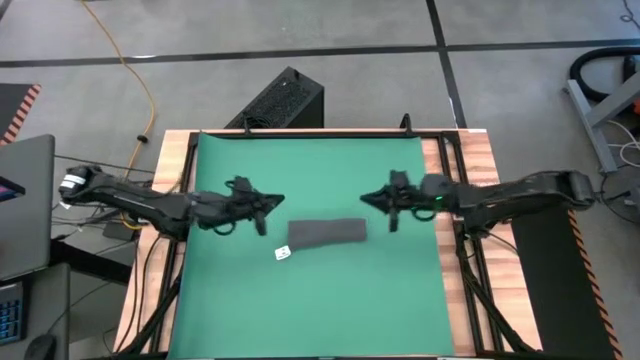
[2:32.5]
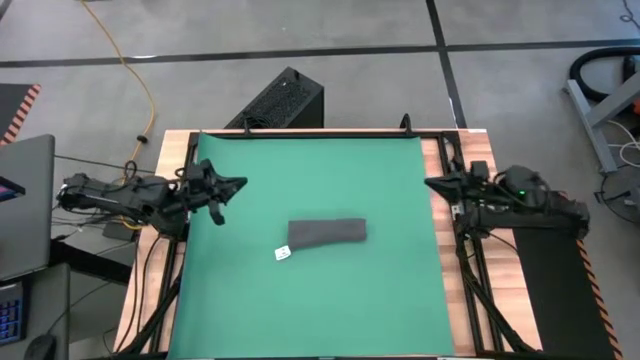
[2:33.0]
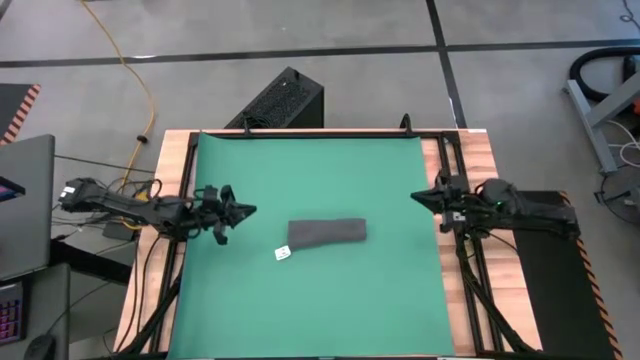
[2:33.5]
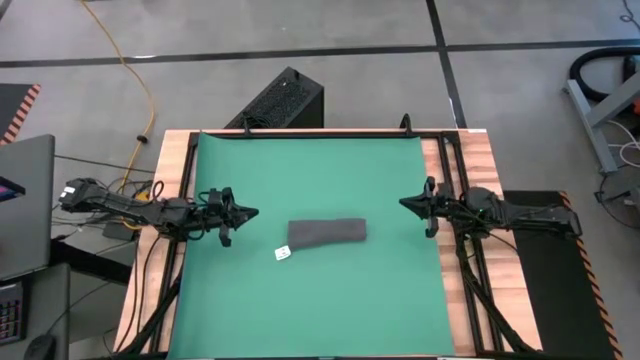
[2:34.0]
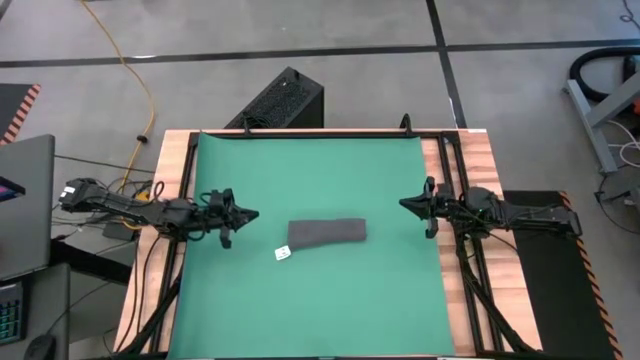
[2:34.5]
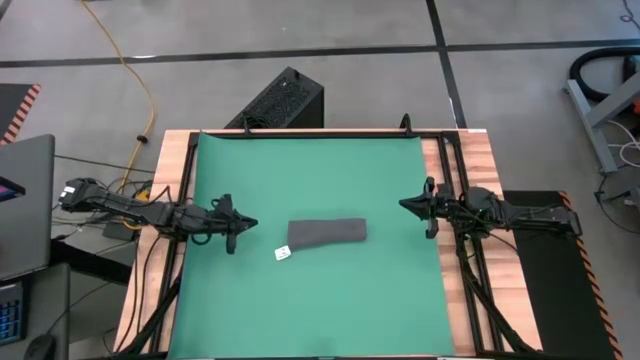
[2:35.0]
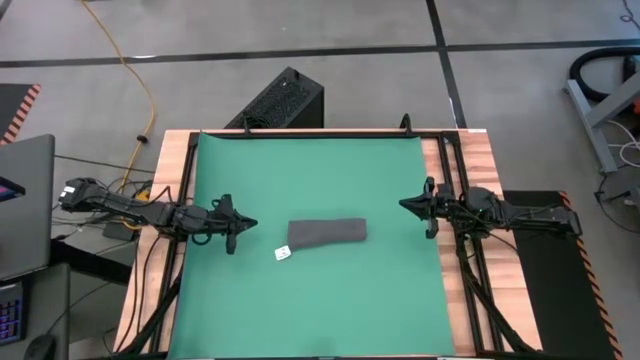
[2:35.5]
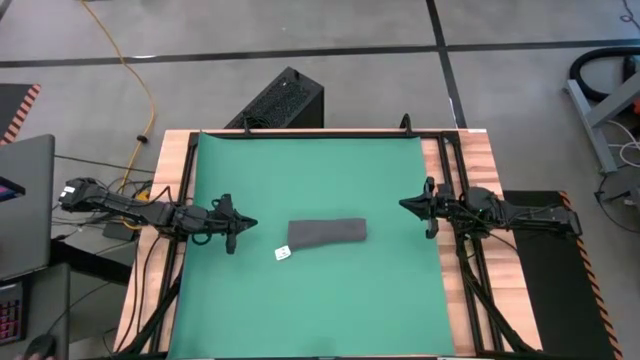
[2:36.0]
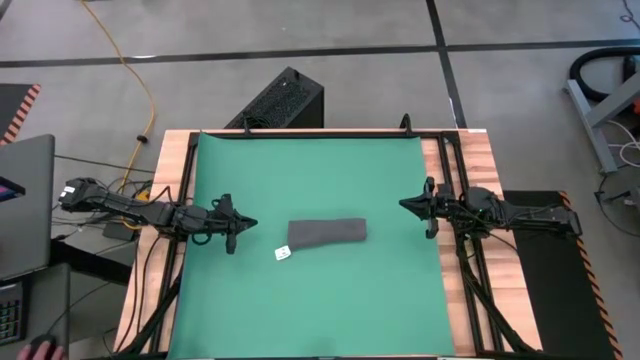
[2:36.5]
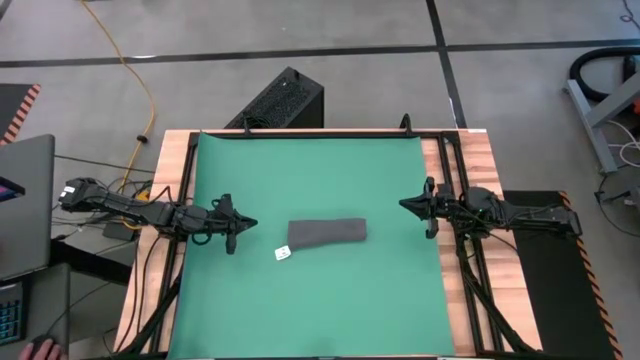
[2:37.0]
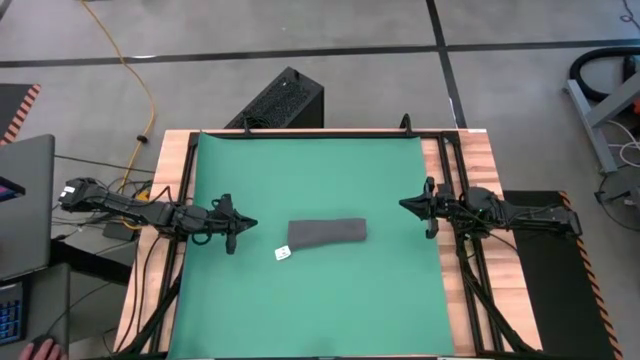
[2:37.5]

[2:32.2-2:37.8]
Task: Roll towel into tight, uniform cylinder
Return to Home Position

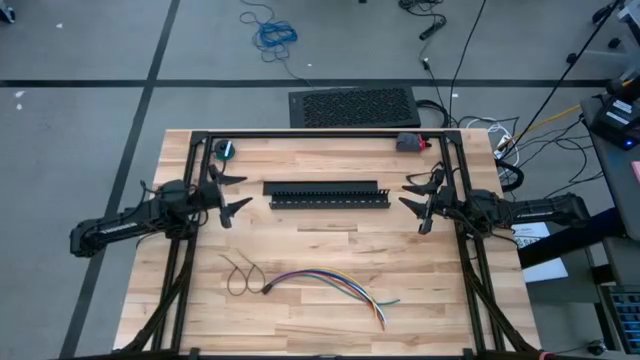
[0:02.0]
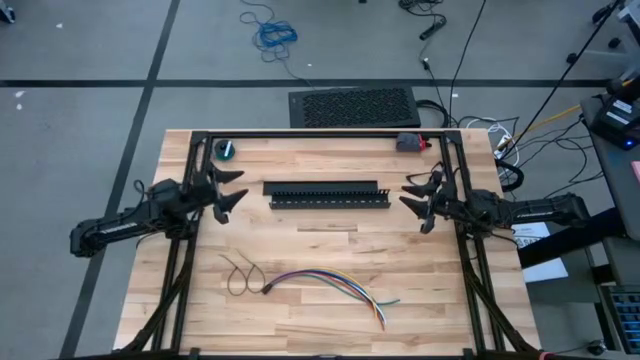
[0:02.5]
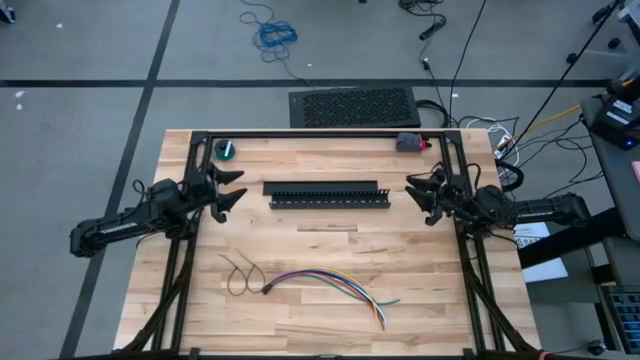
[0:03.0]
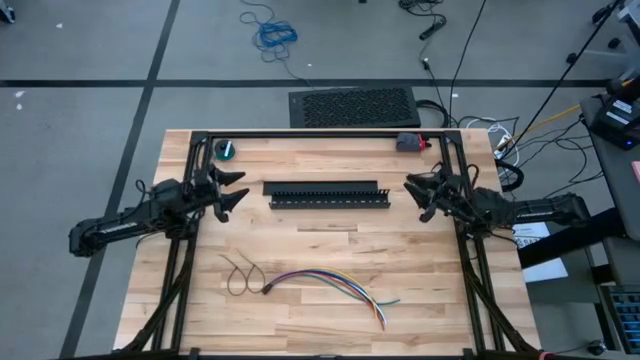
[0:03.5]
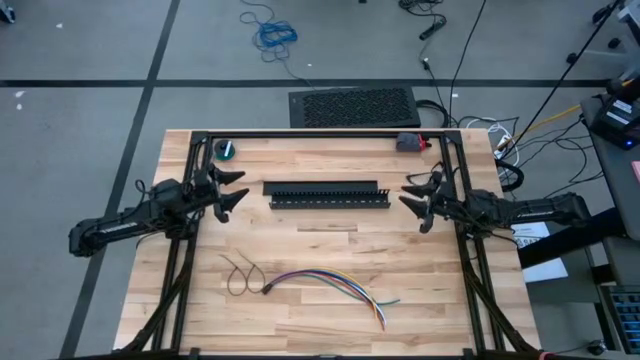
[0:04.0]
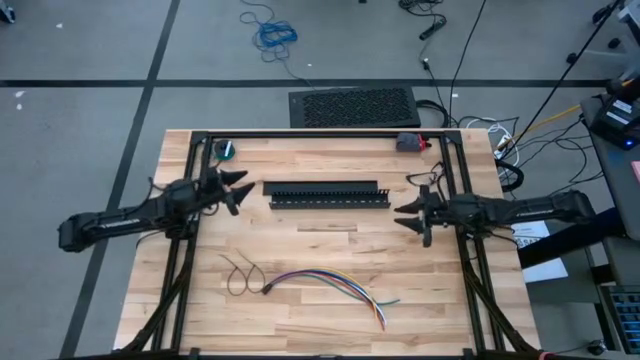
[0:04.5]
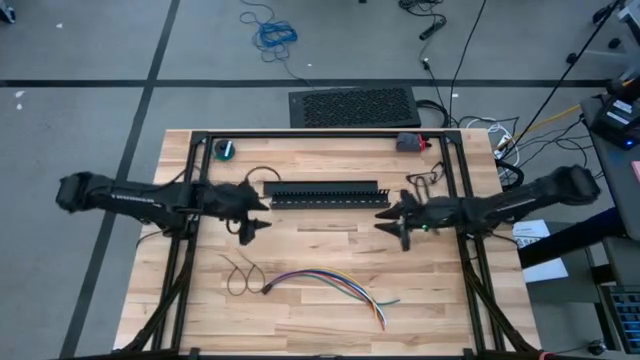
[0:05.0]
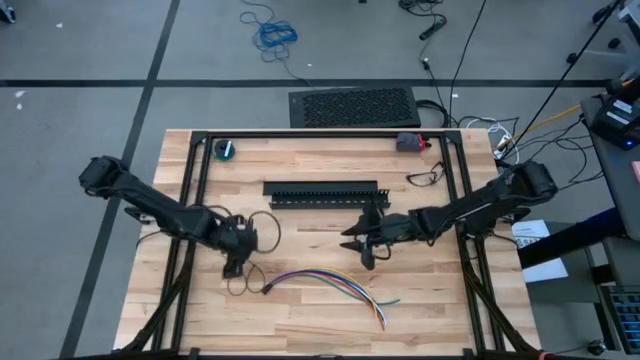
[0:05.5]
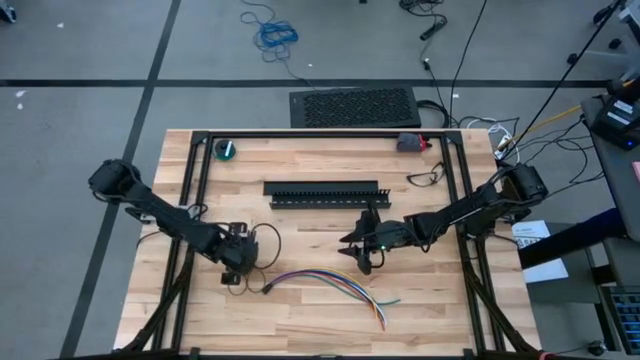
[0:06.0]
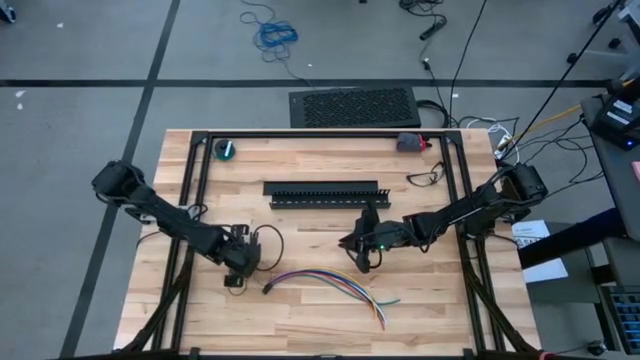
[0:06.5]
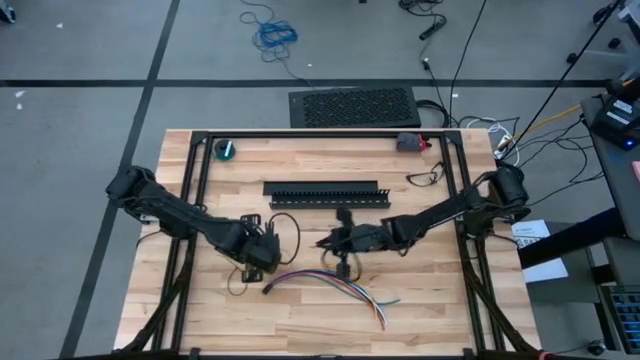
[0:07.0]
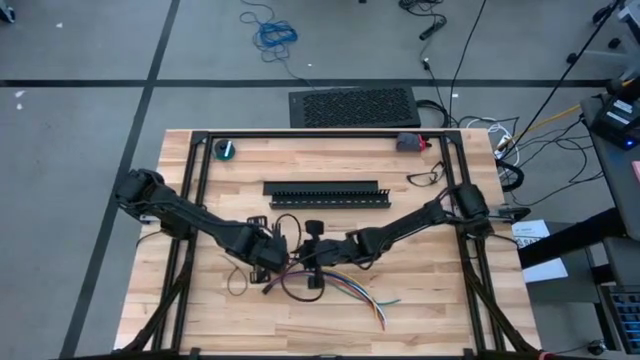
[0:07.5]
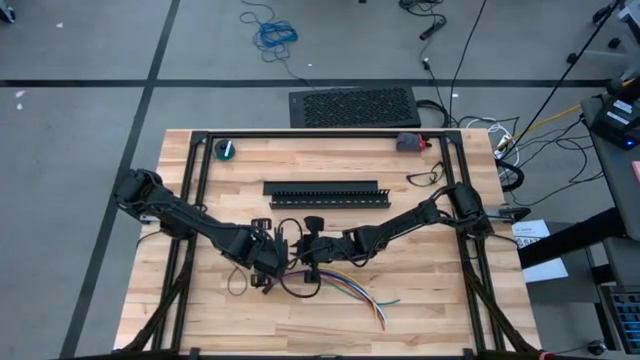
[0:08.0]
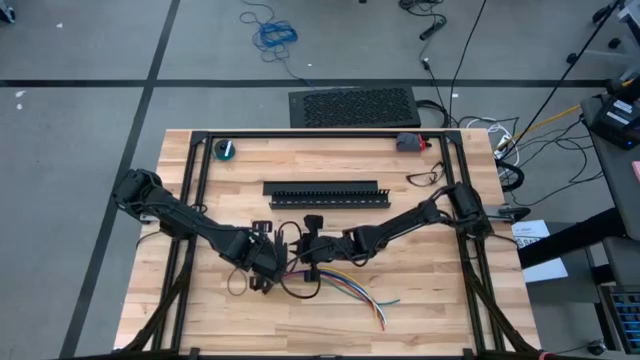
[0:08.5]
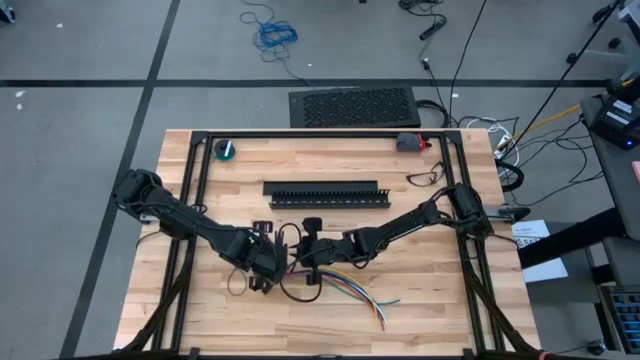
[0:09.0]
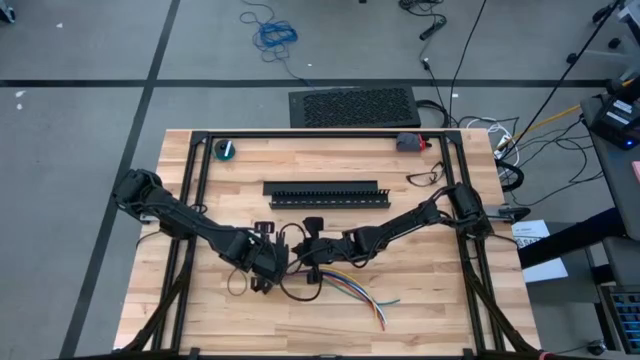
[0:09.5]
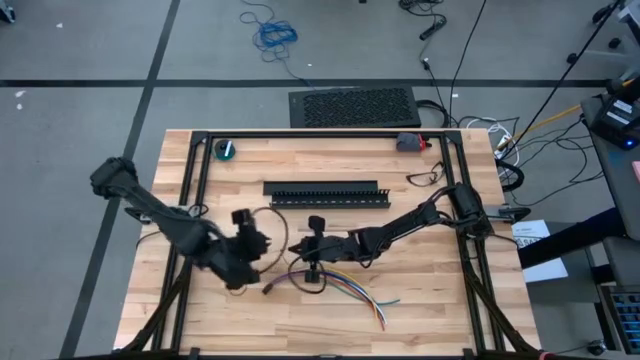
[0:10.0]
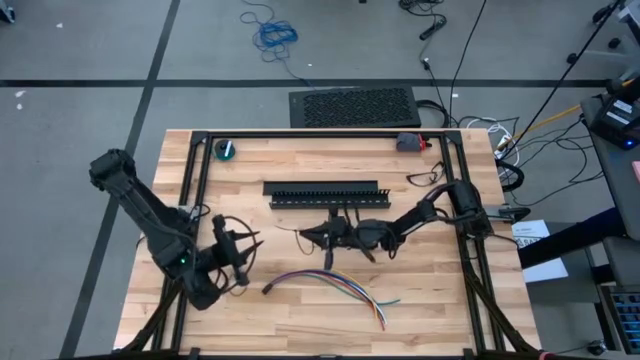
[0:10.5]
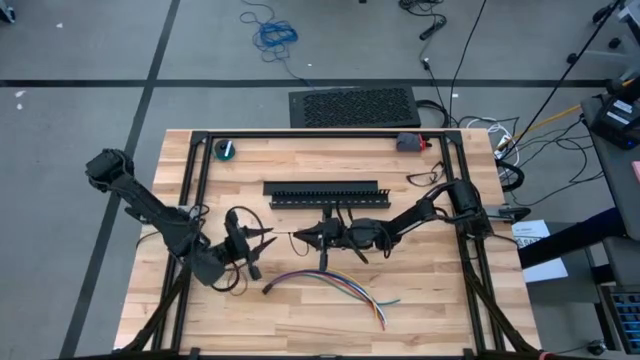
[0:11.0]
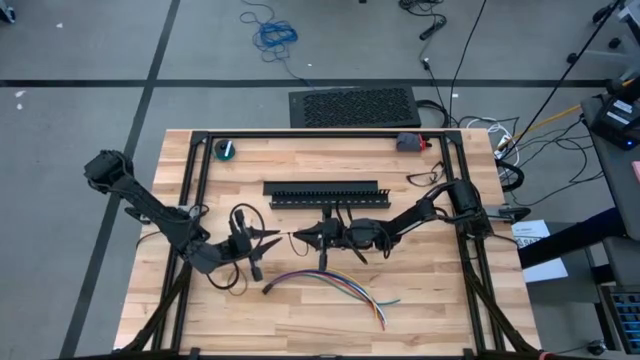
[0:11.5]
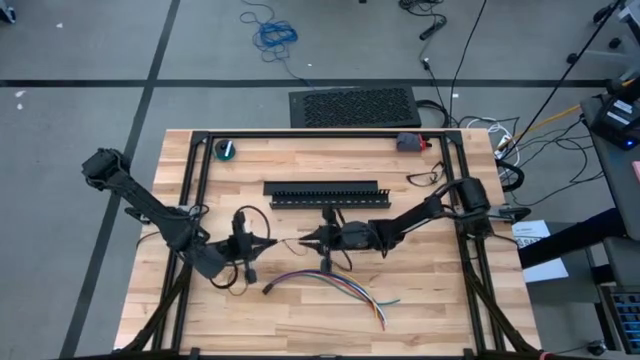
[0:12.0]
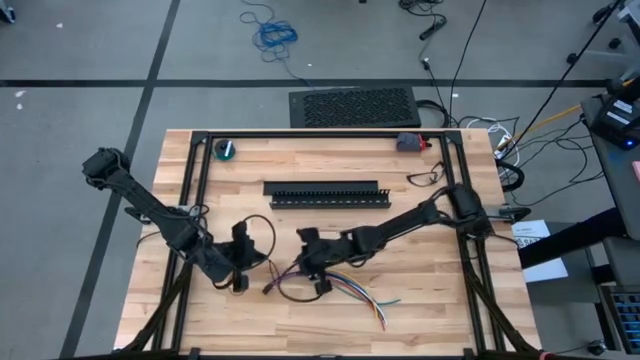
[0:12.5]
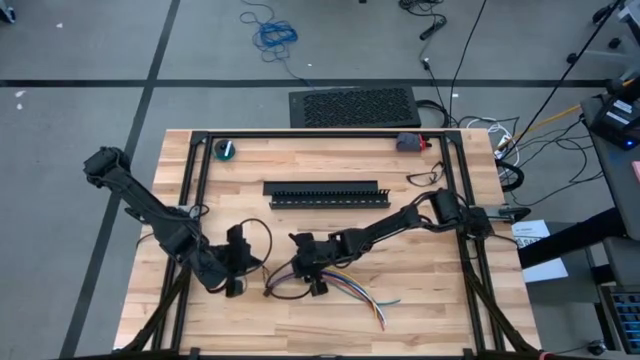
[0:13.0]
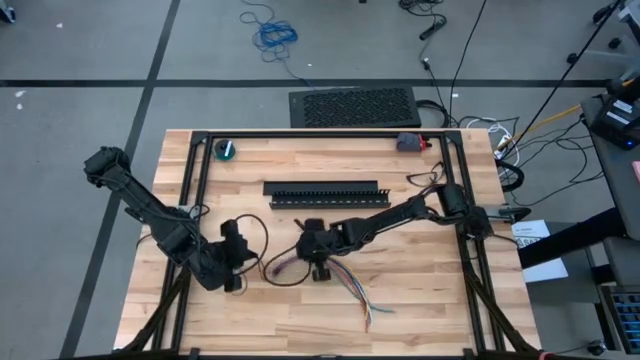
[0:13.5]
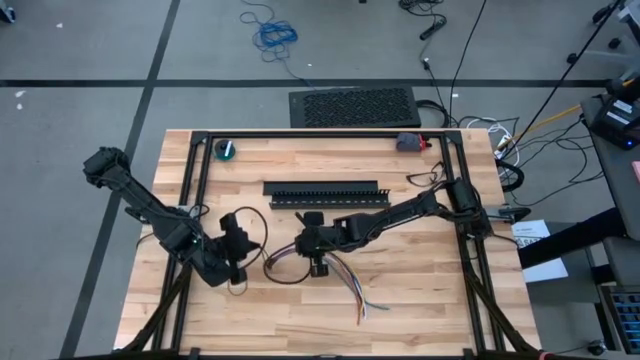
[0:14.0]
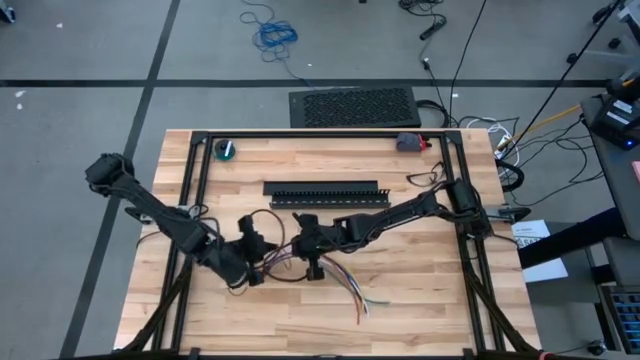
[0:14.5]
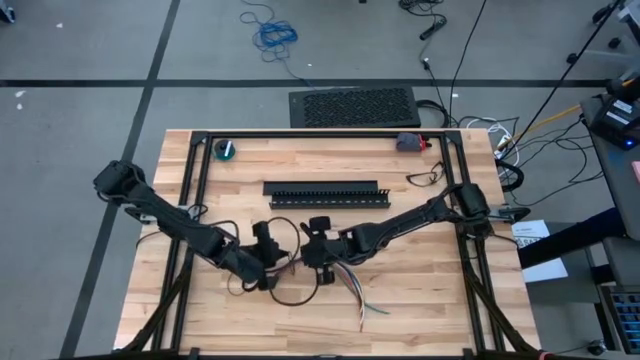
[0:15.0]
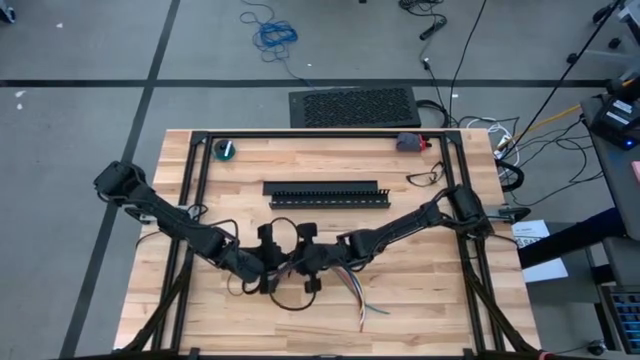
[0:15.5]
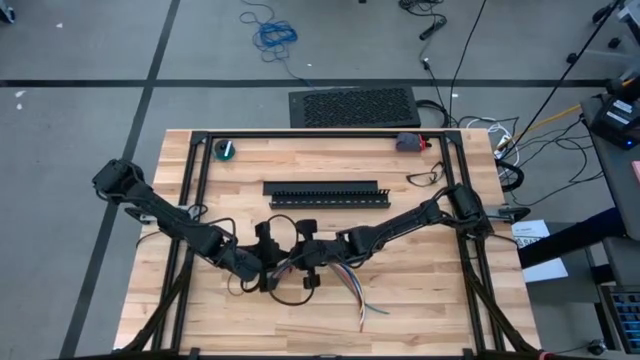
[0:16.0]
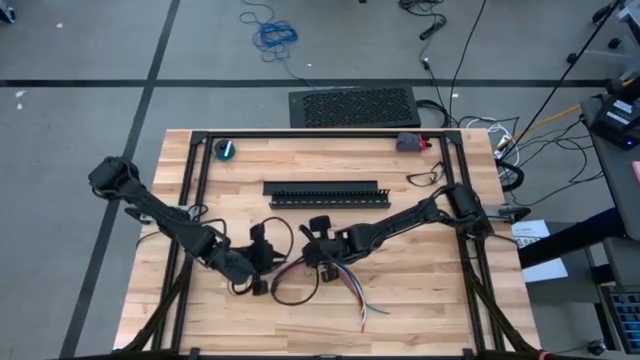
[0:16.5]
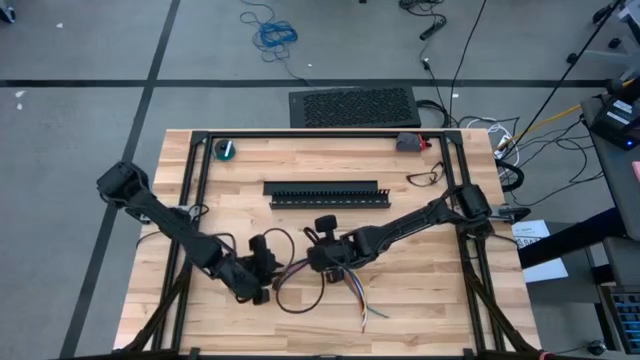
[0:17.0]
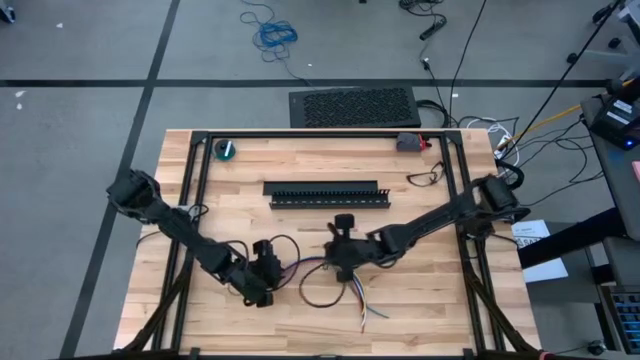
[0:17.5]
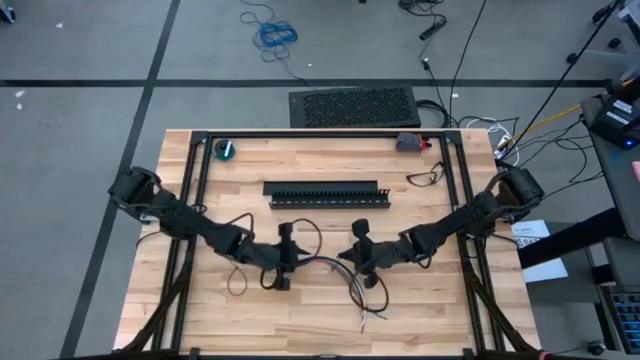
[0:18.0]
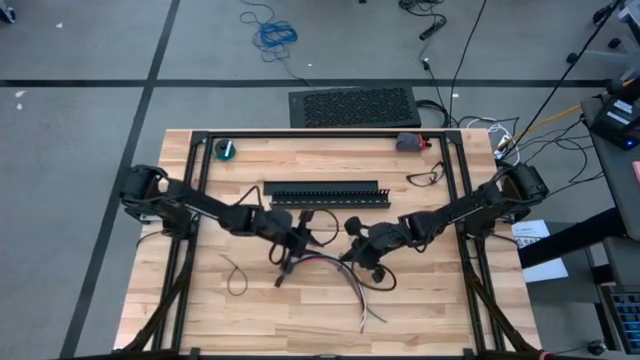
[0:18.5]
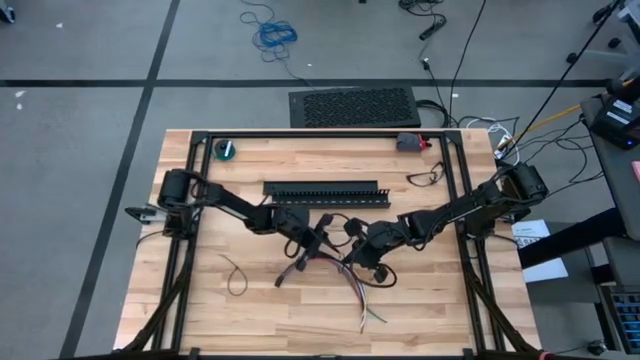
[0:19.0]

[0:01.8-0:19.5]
Task: Ziptie cables
Wrap the cables together using a zip tie
